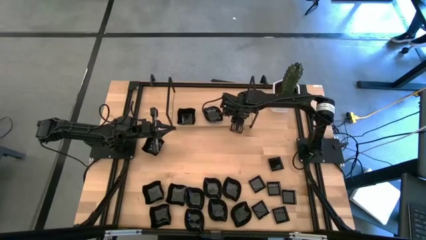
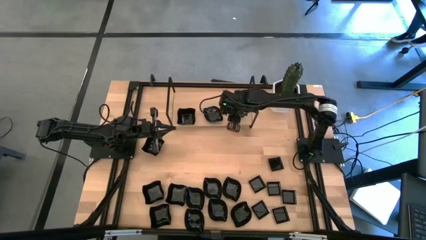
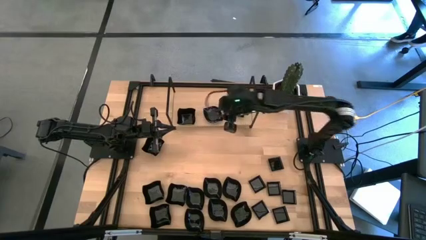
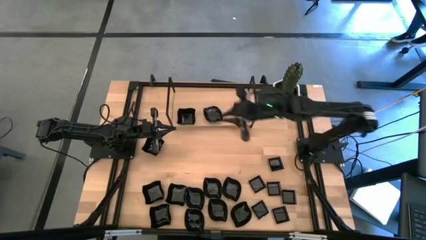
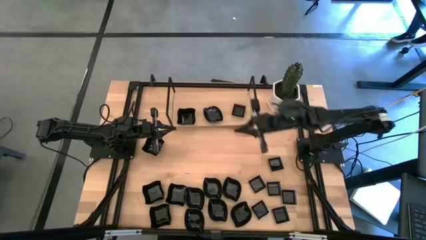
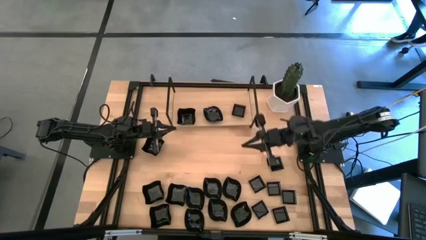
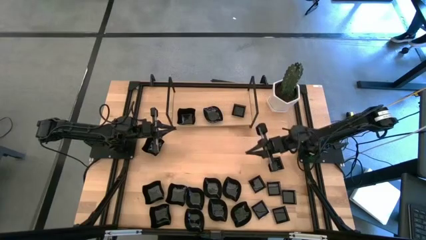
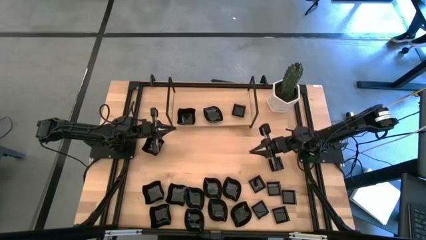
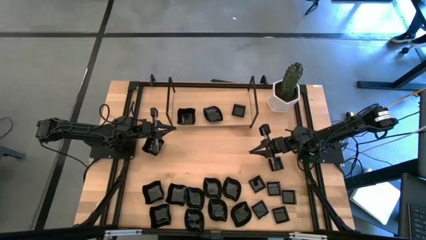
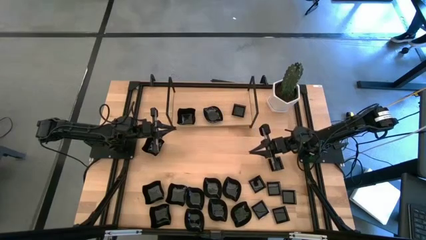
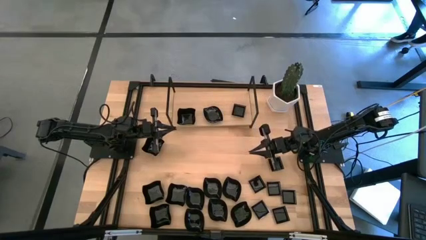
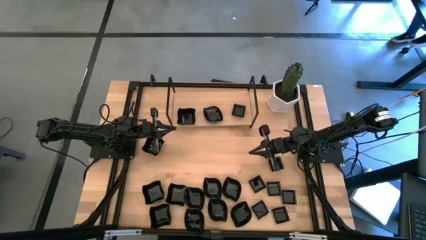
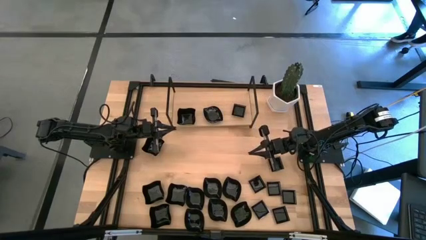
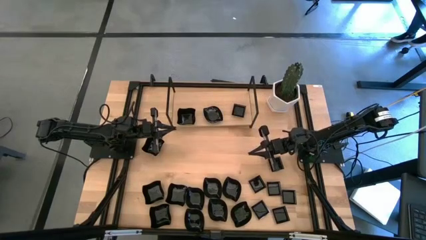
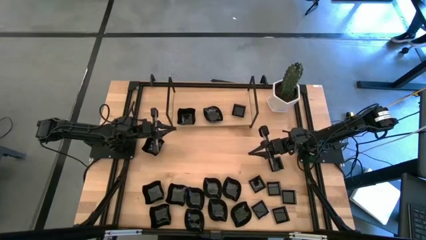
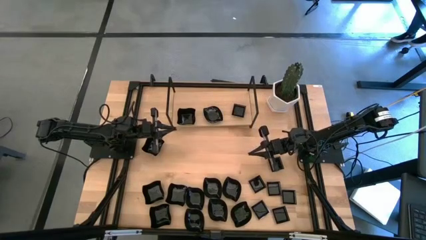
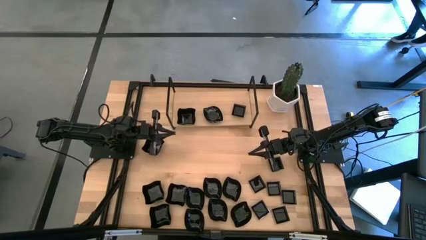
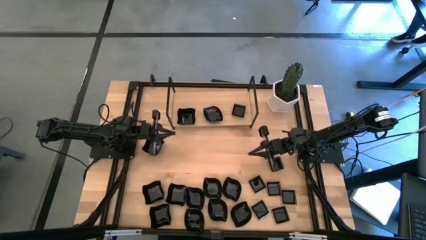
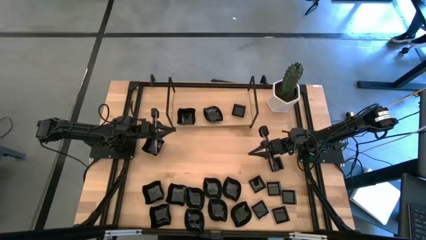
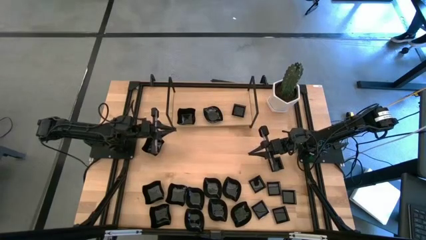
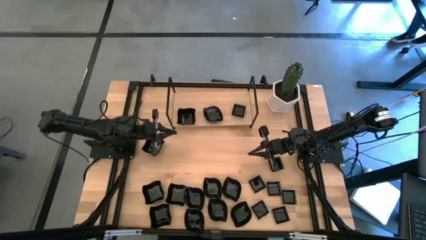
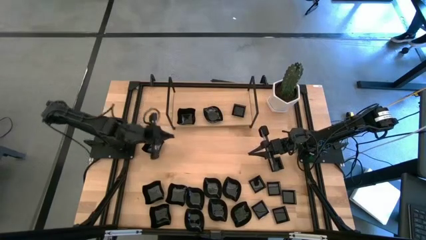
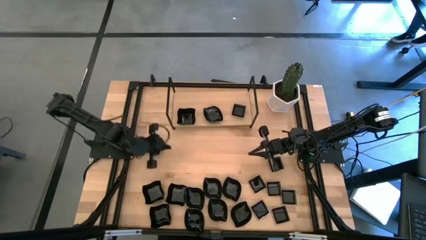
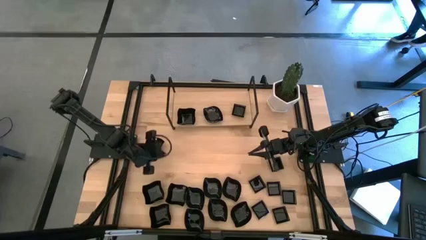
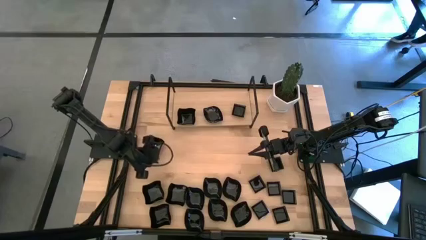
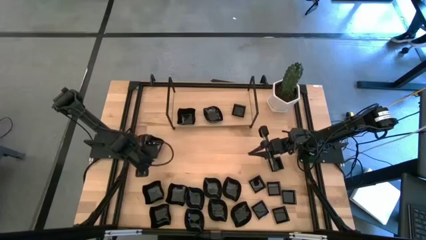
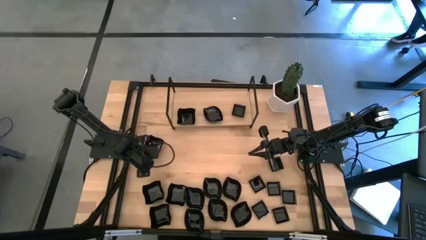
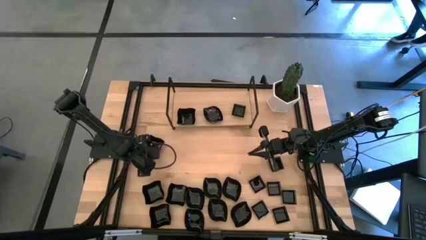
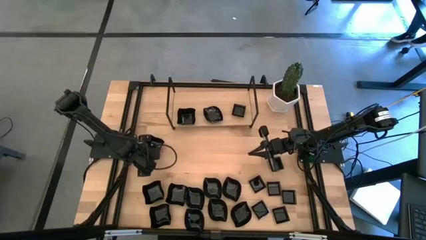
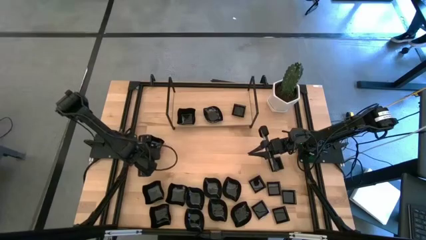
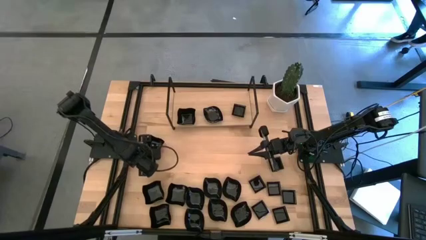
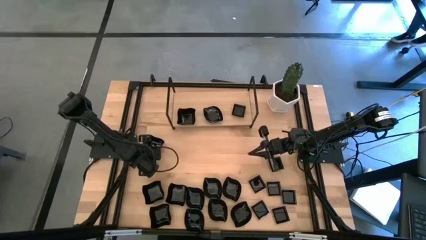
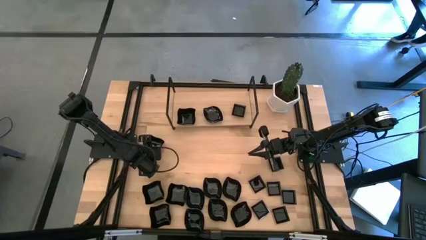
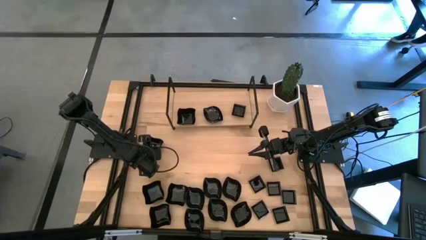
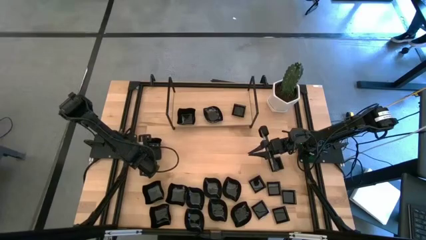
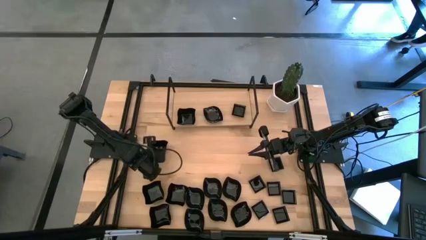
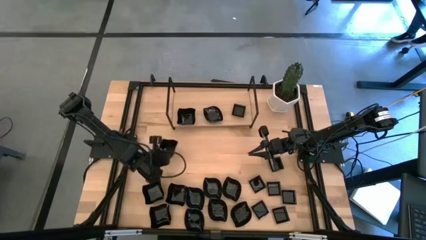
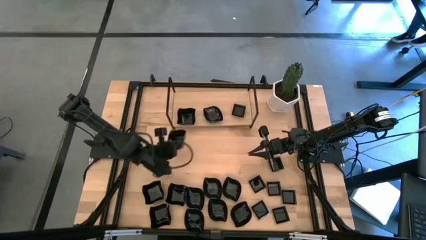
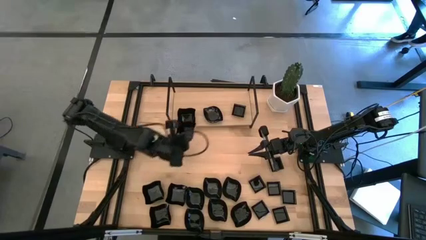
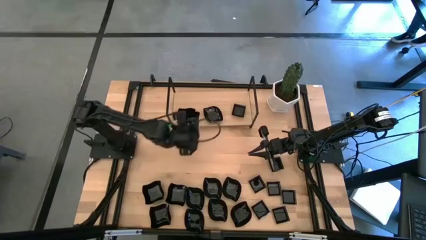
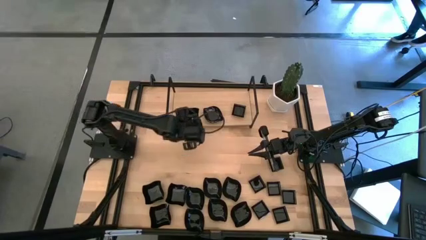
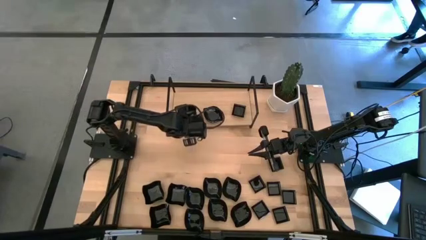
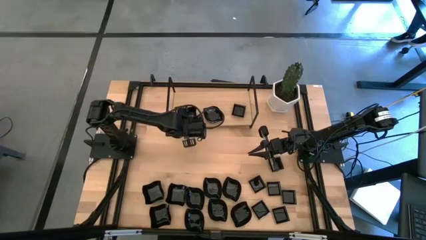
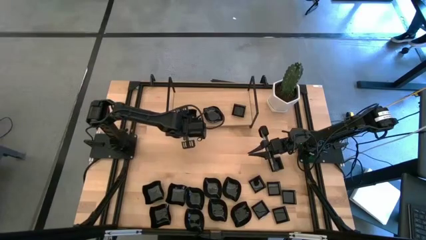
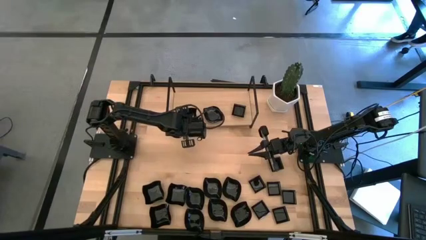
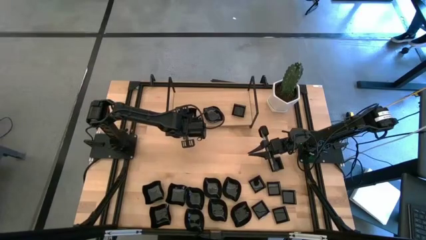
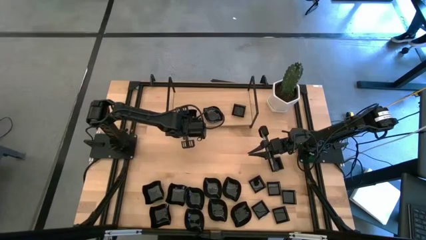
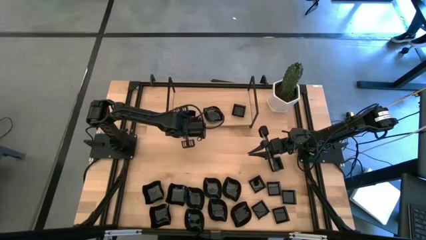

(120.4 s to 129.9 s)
Task: Pick & Place Mini shaped plates
Stack the black distorted square plate on top of the black distorted square plate on the shelf

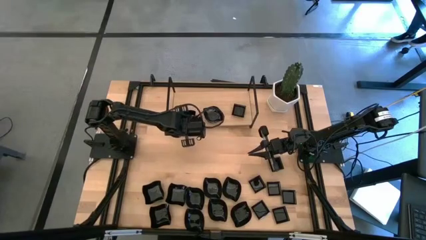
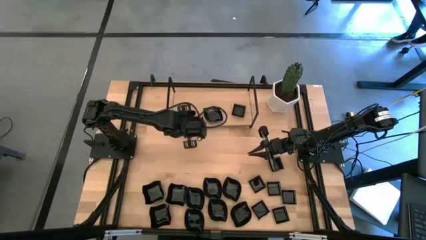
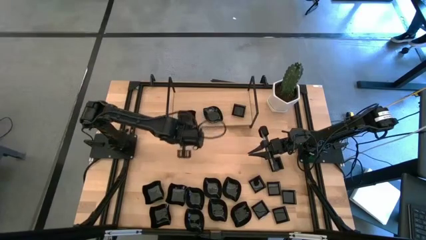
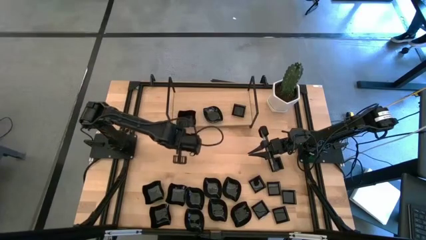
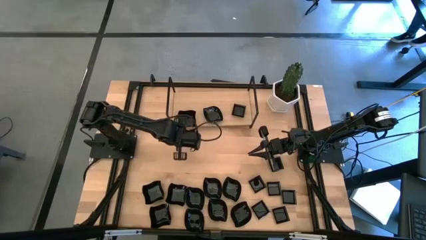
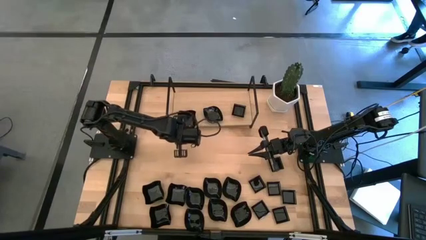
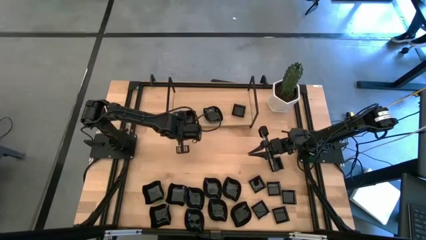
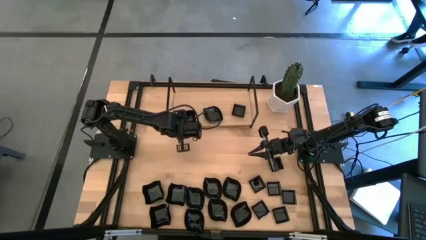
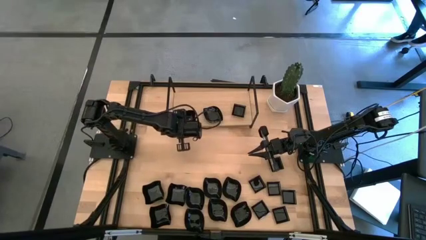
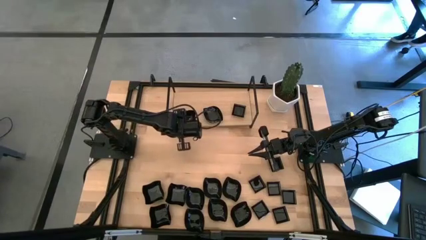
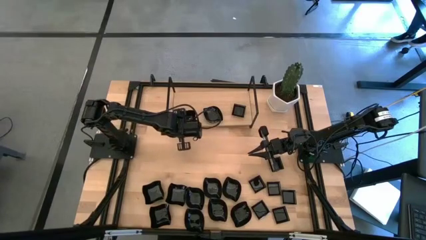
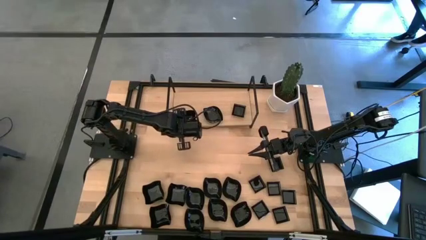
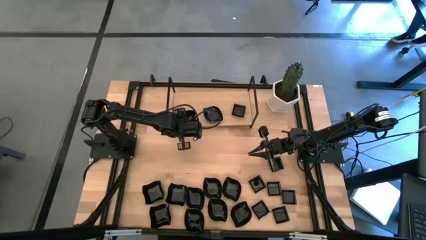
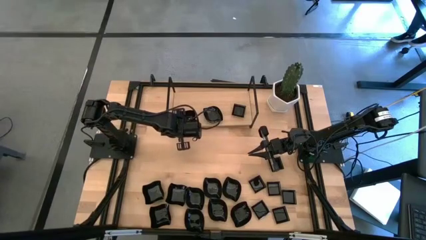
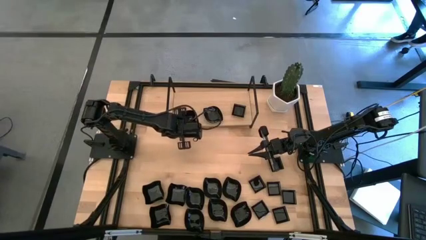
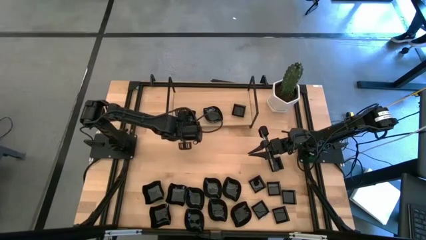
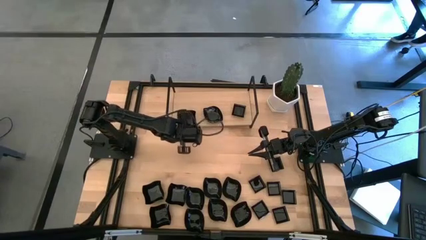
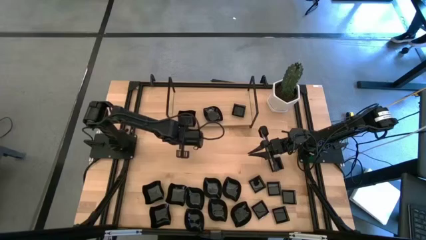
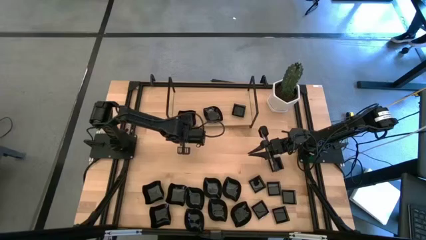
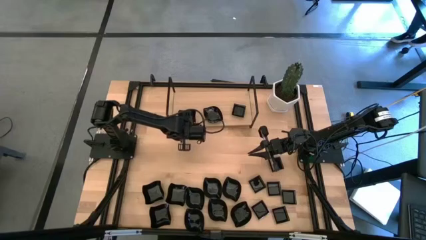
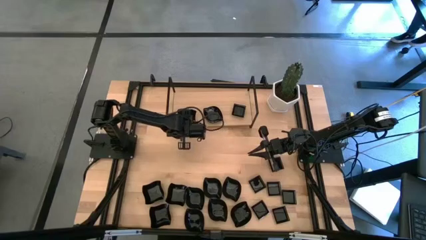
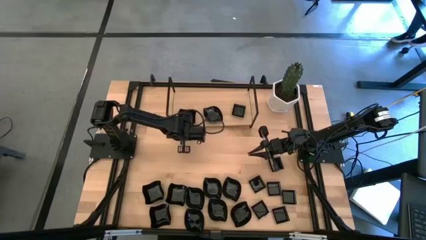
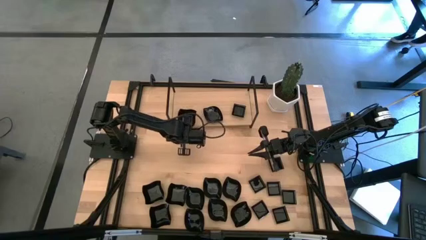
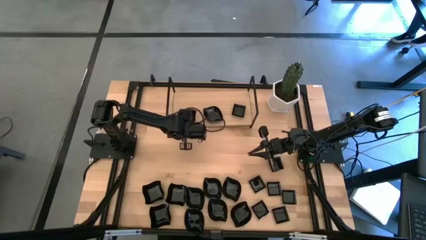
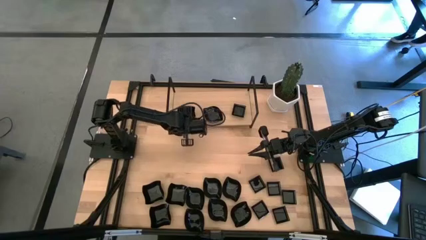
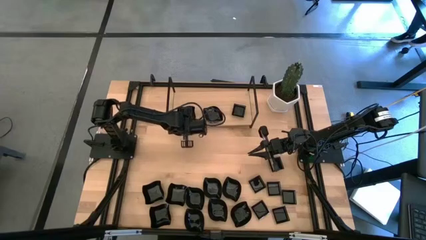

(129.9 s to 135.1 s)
Adjust the black distorted square plate on the shelf

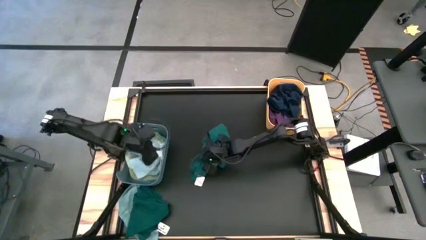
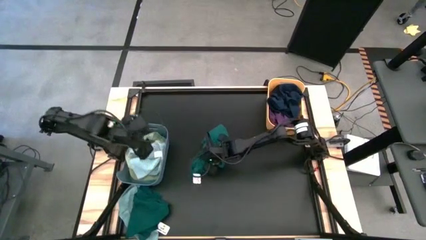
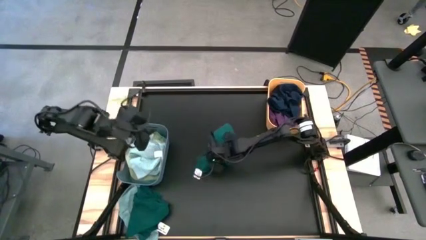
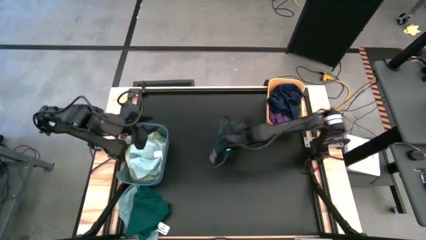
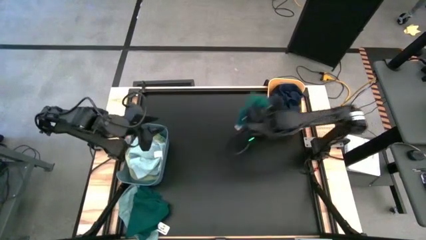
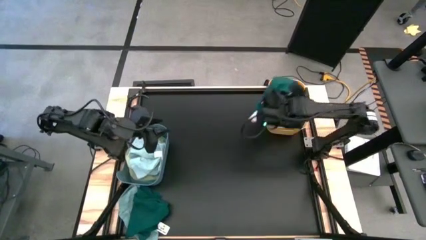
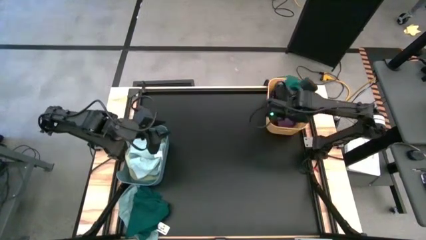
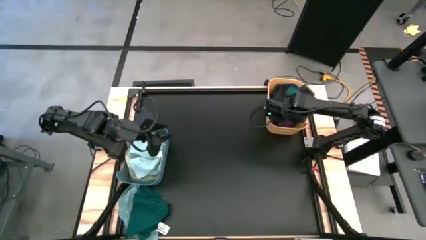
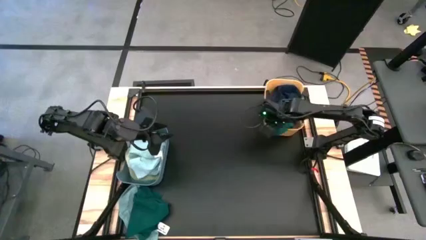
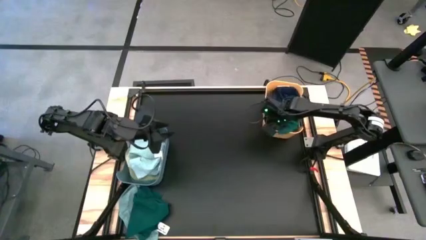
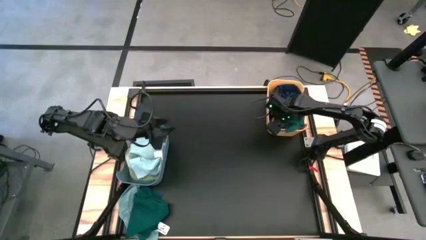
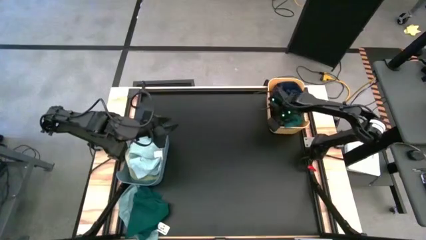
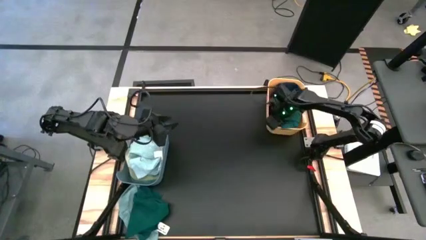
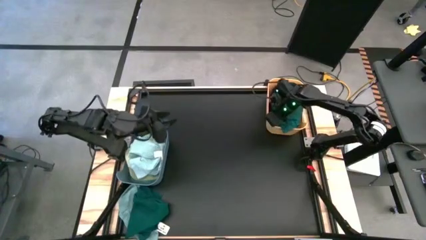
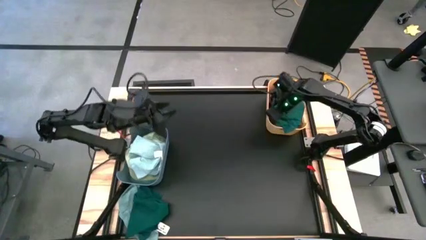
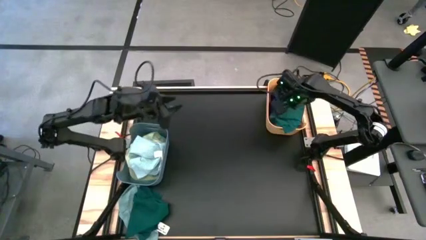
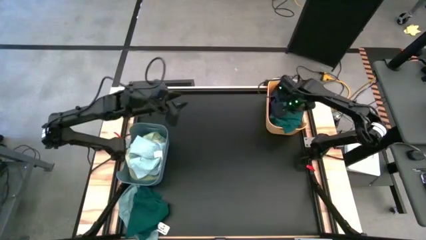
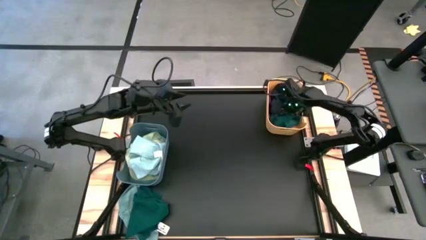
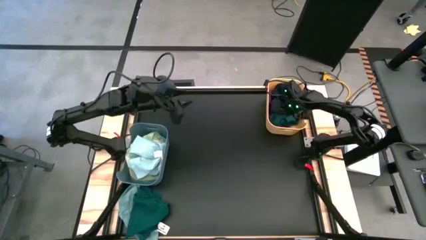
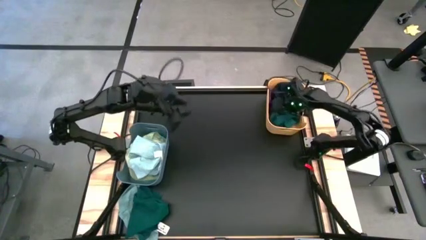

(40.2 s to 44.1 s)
Task: Sort towels by color in basket
Put the right green towel into the orange bin
